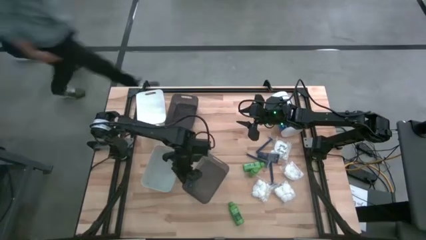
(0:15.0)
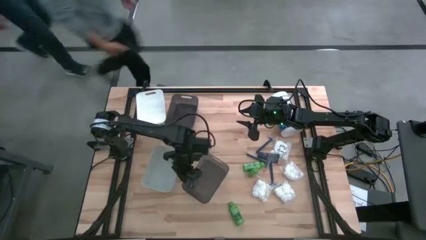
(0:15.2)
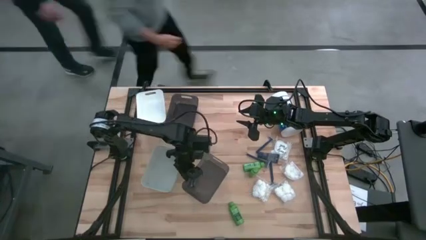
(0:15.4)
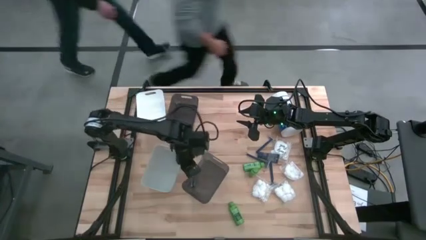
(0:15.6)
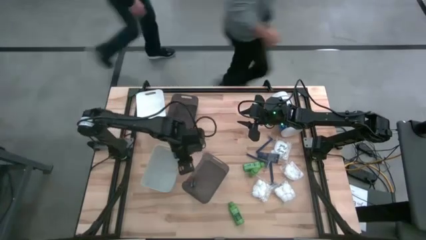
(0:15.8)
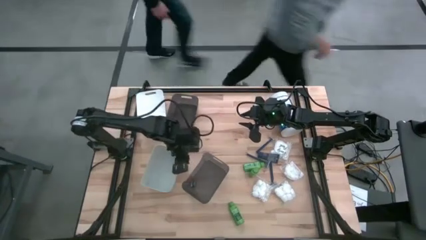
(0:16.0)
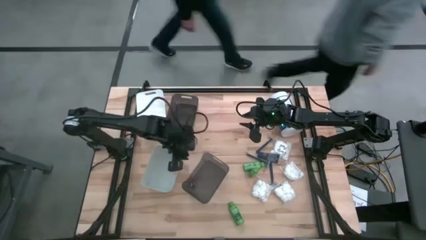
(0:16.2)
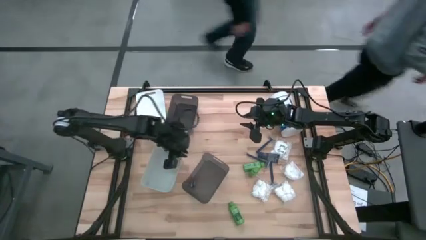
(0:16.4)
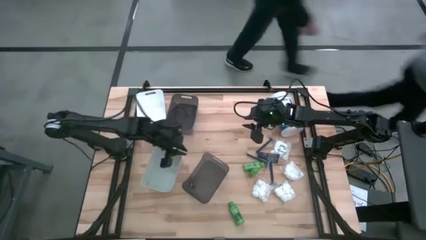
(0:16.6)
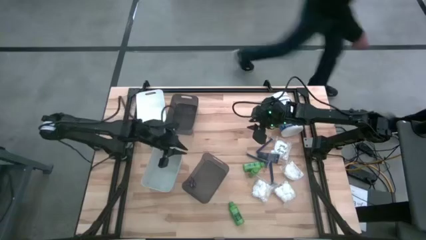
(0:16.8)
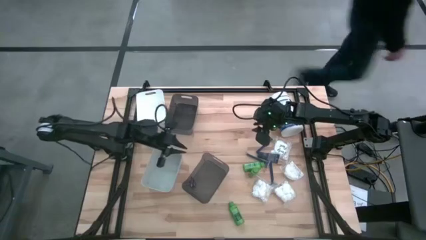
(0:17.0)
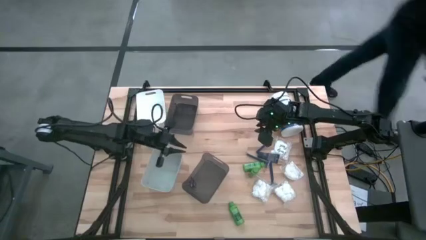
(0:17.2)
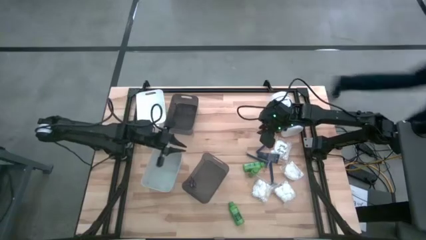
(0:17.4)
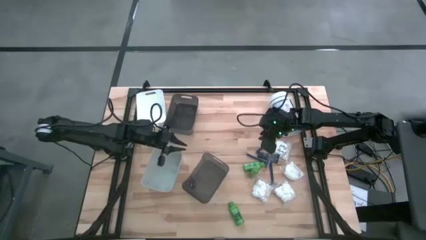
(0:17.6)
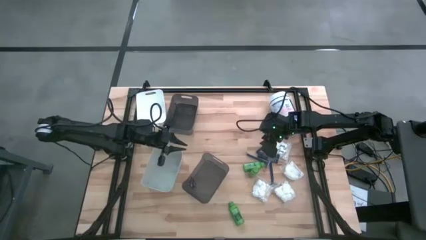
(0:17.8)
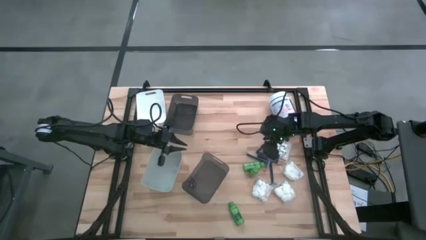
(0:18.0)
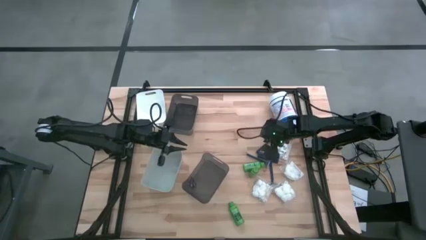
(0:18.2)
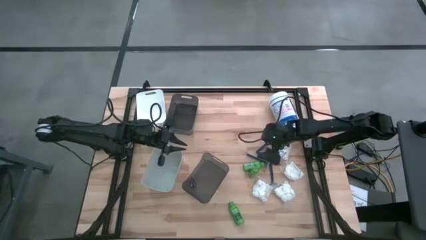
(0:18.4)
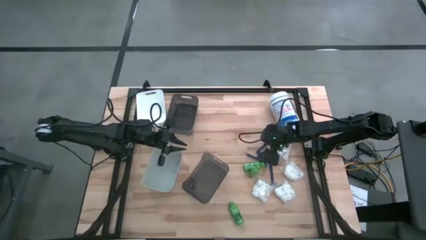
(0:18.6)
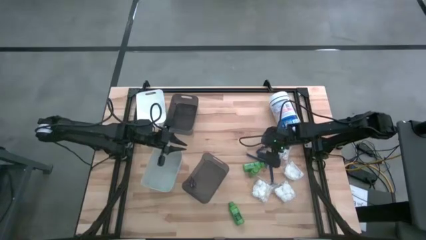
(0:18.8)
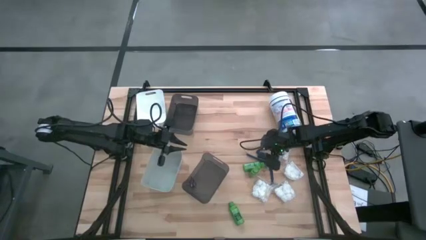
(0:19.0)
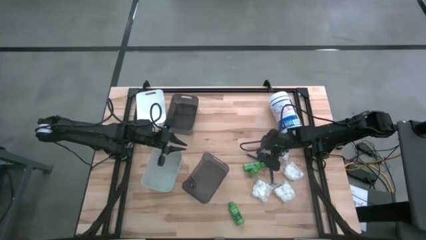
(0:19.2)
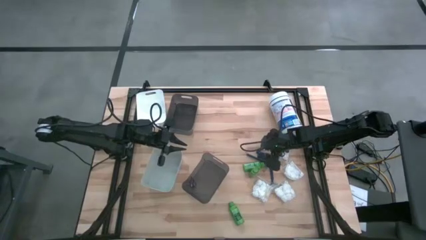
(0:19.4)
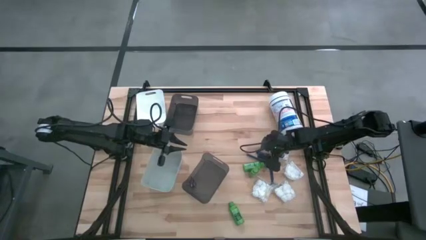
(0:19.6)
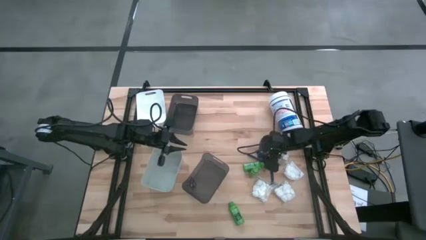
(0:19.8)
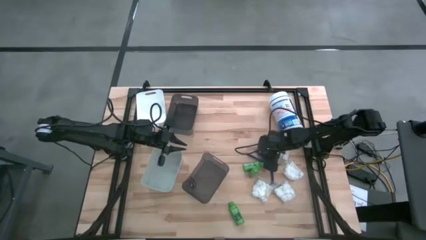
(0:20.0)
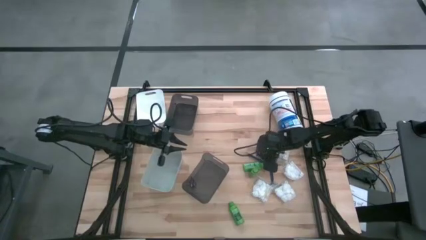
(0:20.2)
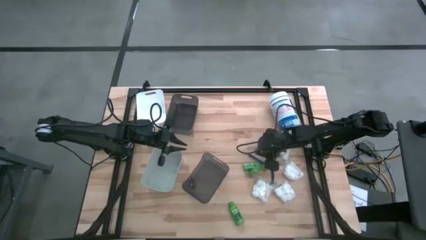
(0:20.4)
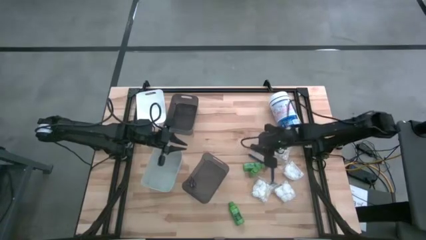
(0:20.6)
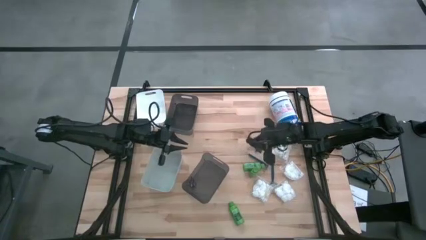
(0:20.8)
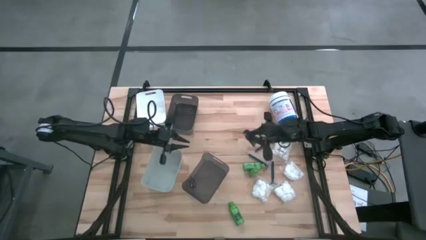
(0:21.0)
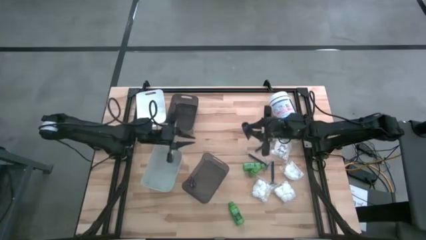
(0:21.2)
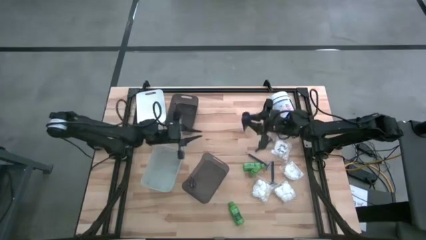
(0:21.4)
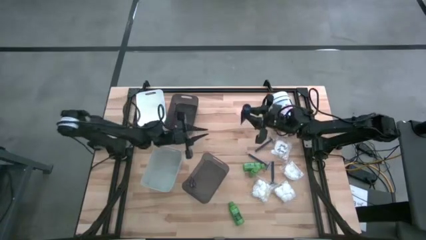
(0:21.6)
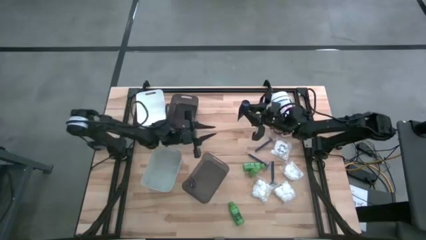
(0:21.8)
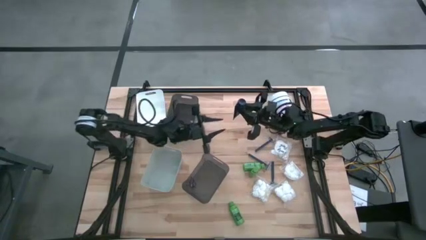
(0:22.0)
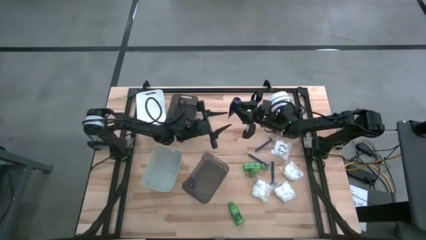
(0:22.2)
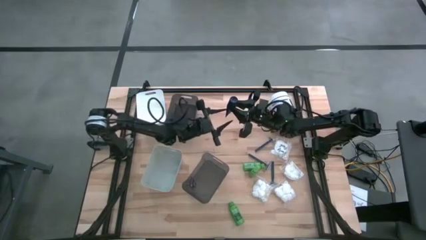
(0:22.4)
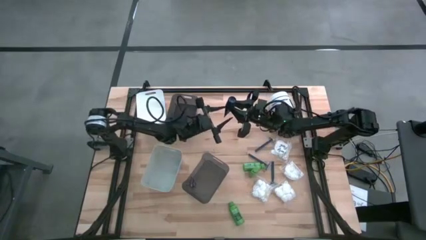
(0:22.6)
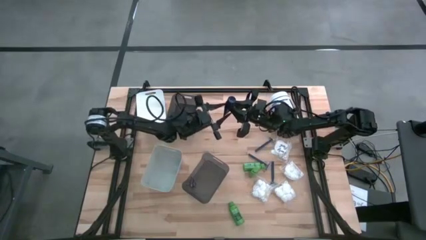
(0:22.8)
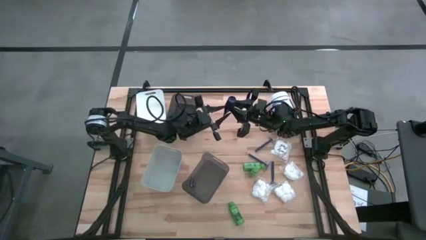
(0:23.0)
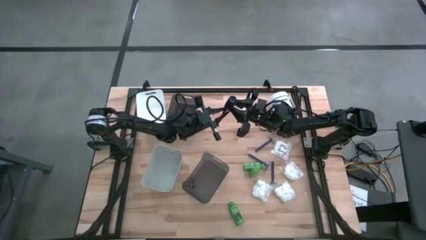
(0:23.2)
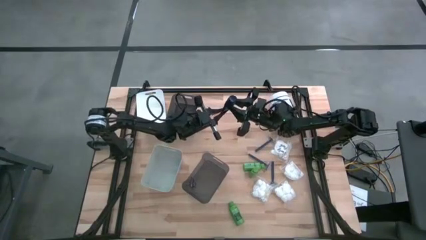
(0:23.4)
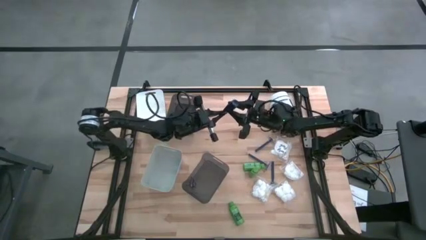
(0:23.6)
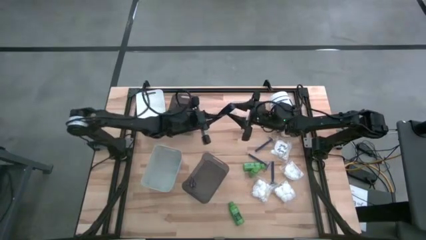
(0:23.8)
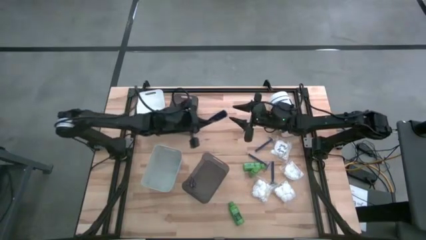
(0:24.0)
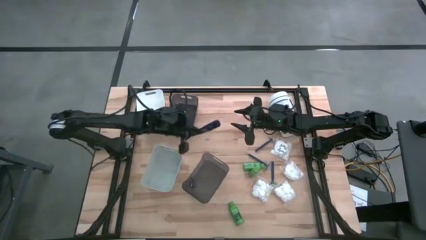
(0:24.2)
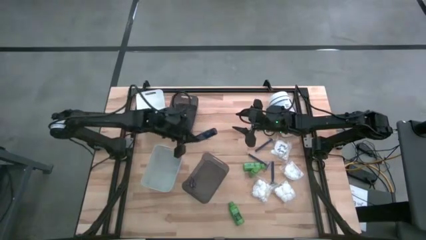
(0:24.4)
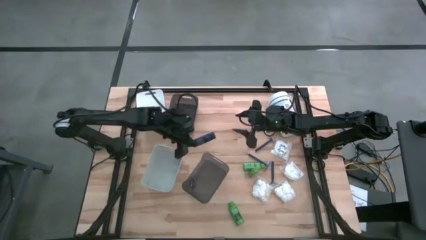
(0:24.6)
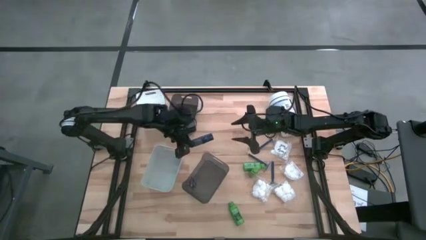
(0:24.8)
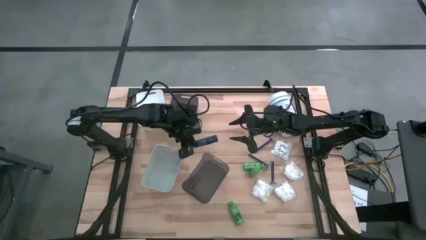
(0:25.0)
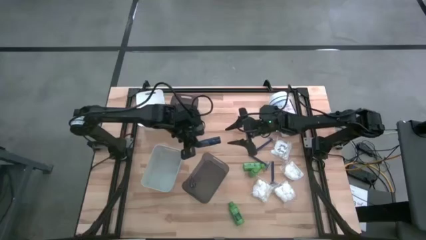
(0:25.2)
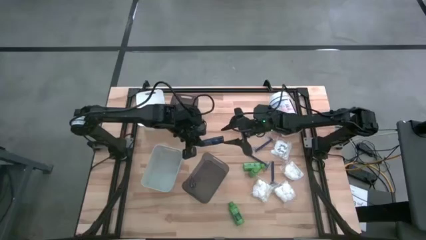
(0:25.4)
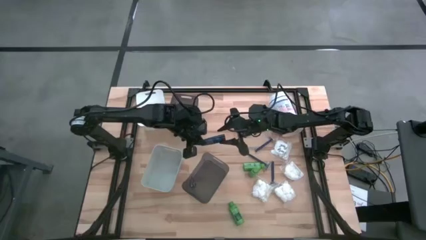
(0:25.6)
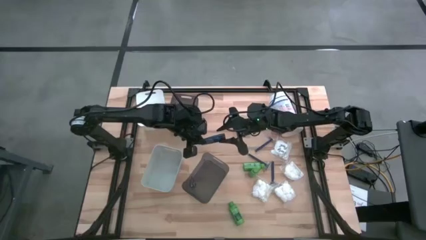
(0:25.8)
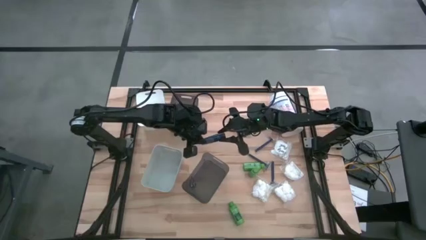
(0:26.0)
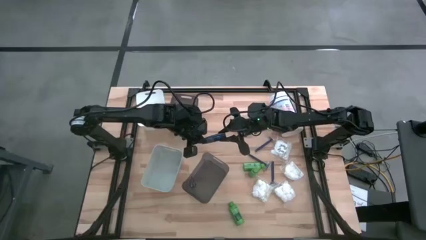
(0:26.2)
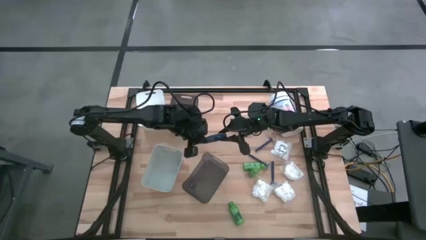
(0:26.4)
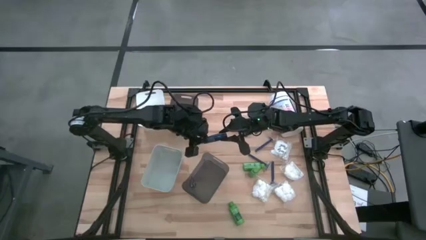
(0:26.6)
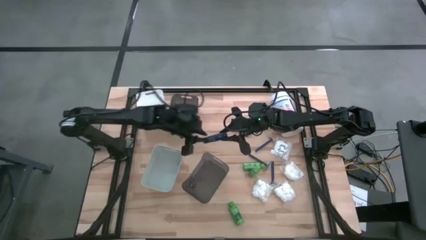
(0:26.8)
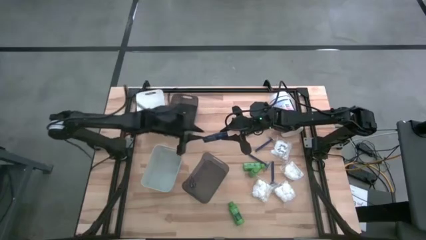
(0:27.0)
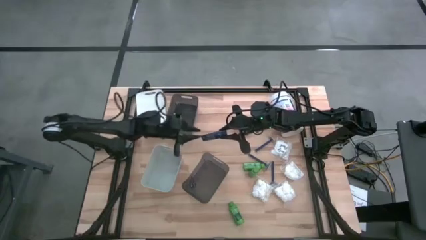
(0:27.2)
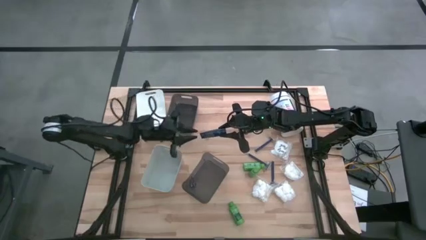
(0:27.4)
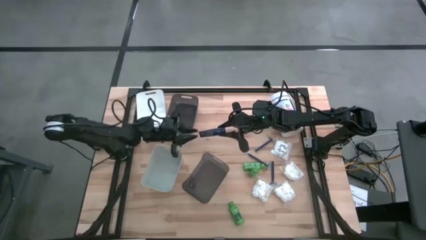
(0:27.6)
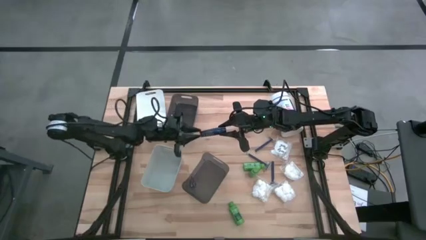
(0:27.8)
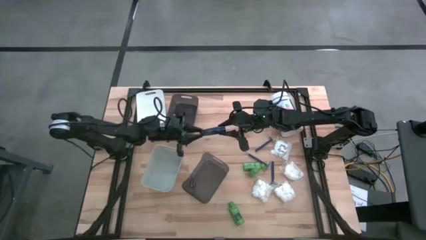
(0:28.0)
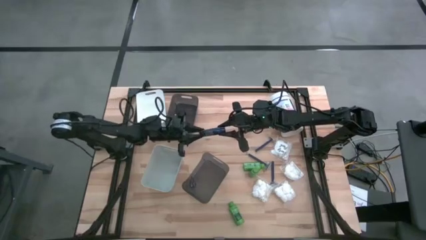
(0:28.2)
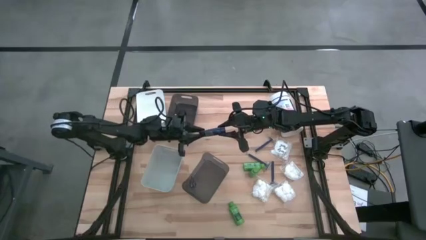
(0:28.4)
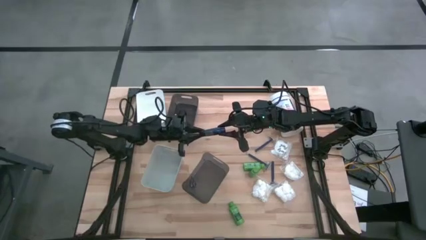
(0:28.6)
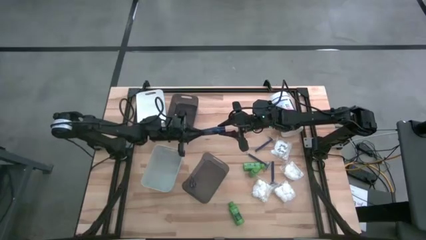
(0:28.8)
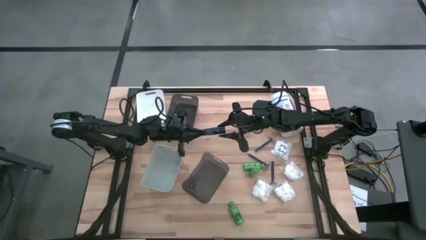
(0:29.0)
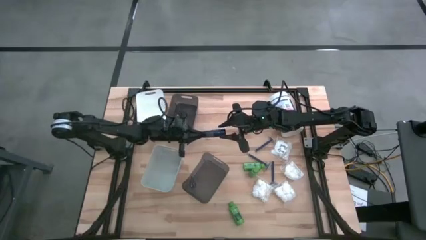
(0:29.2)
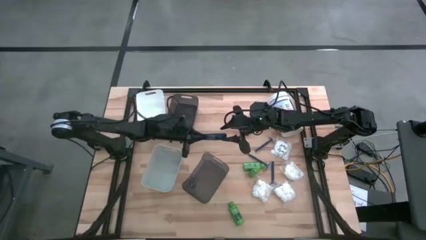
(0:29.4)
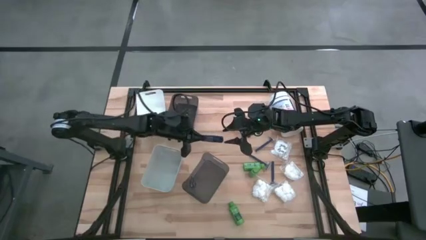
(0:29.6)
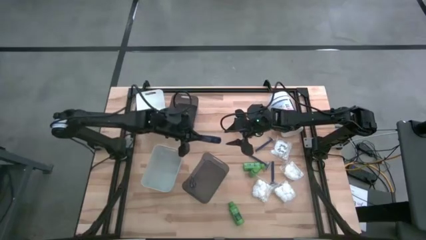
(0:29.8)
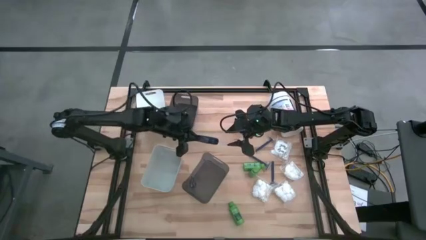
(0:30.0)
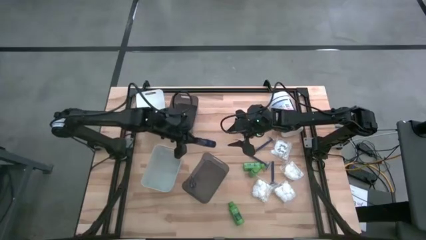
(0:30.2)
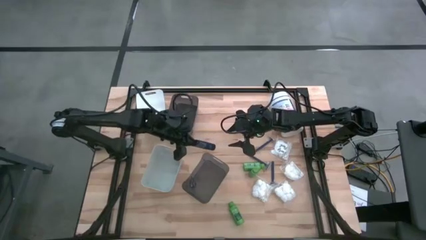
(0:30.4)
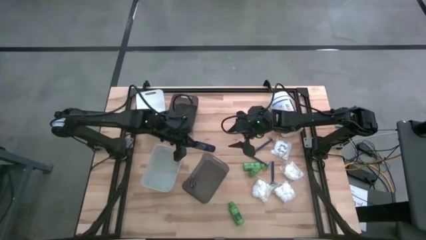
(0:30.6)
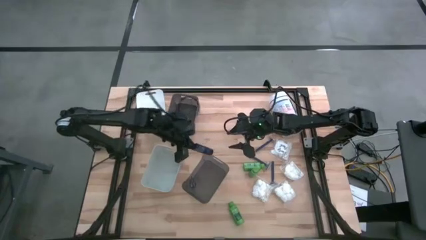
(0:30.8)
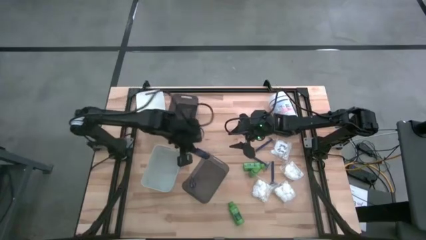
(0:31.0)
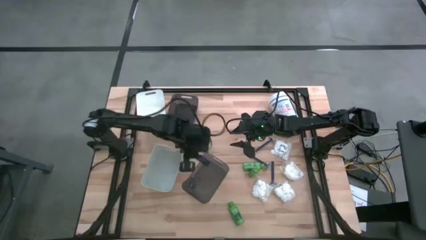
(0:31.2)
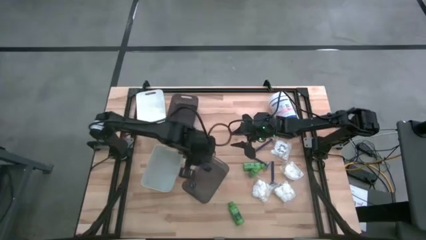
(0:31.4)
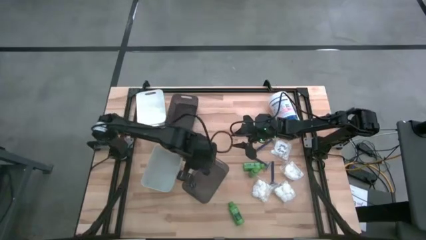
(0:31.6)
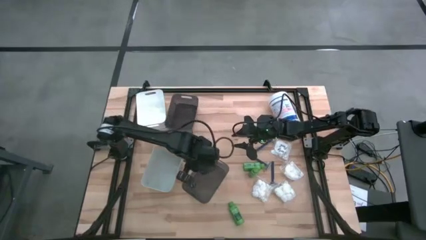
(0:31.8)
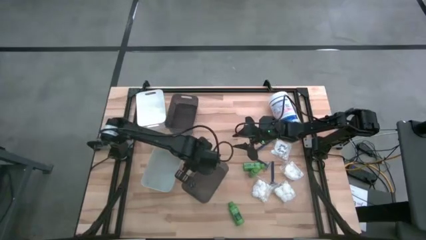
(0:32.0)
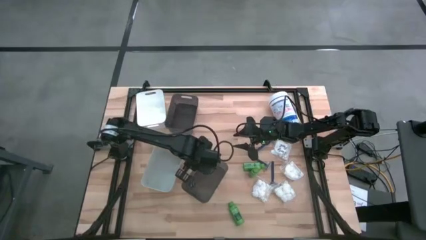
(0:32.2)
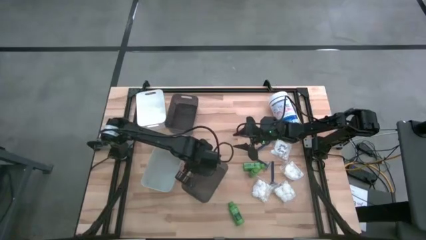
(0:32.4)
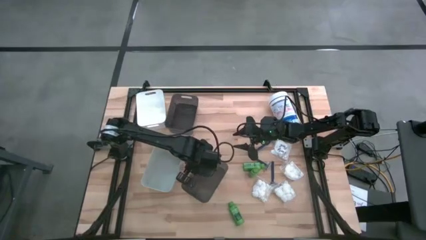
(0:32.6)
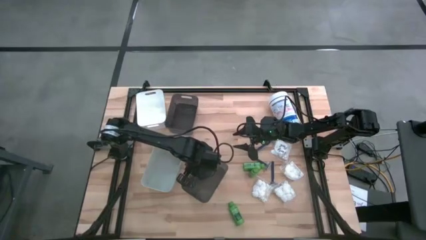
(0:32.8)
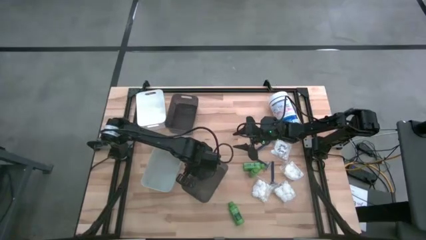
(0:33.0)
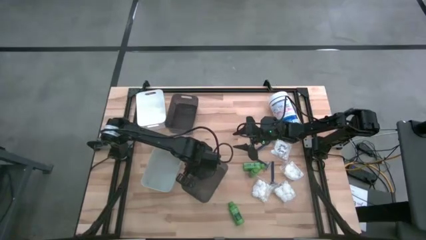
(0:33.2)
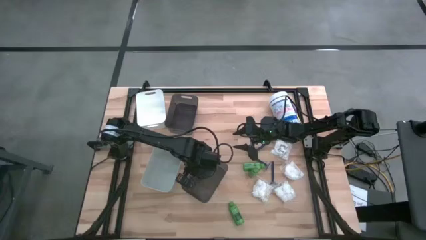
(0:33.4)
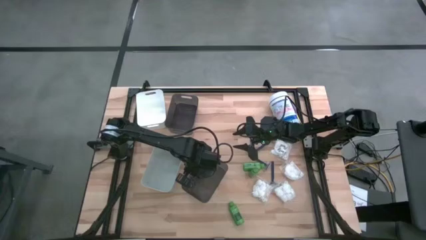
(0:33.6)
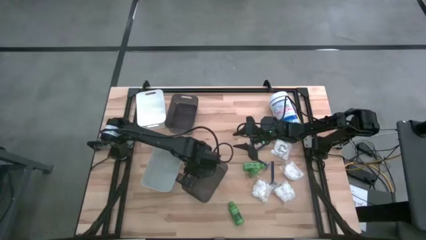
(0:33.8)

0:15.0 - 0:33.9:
Task: Pick & Place Travel size toiletries
Put the blue shave cream into the bottom black transparent bin
